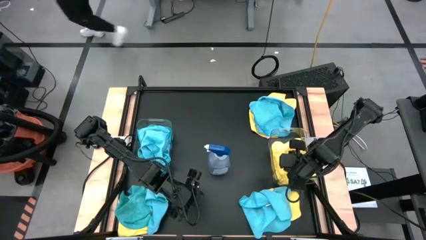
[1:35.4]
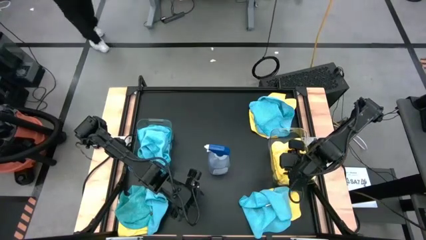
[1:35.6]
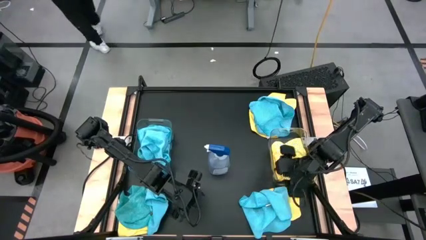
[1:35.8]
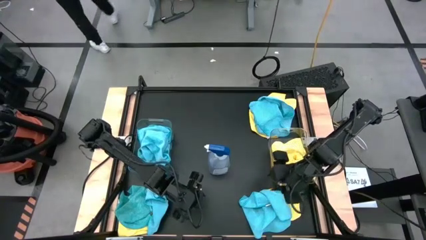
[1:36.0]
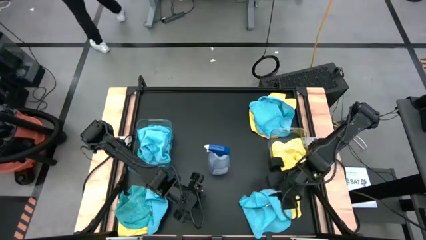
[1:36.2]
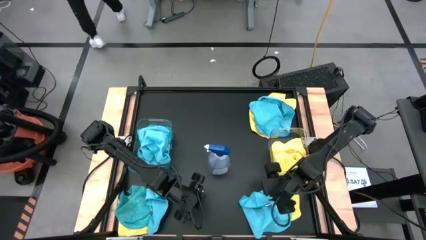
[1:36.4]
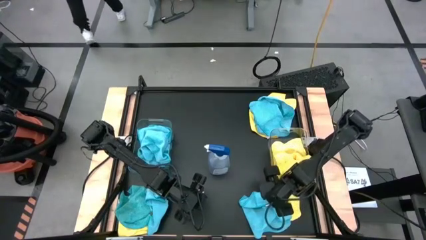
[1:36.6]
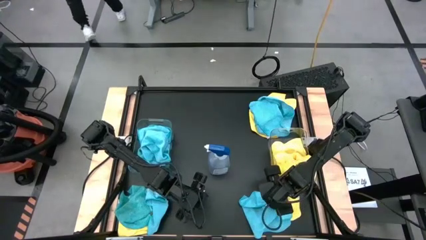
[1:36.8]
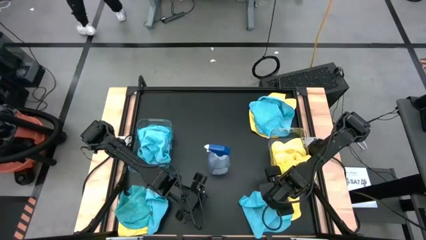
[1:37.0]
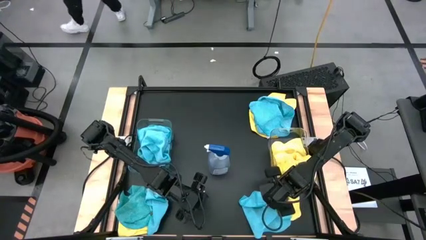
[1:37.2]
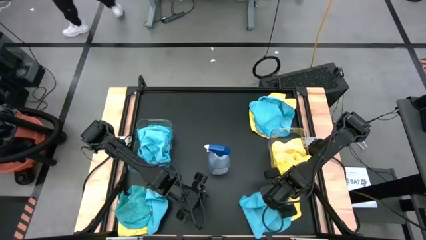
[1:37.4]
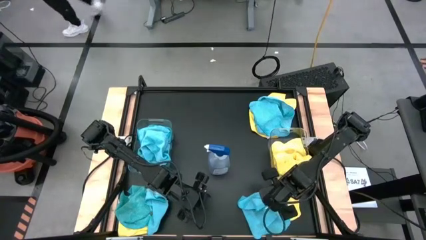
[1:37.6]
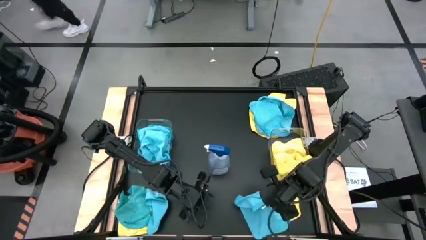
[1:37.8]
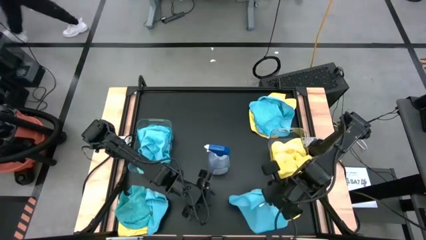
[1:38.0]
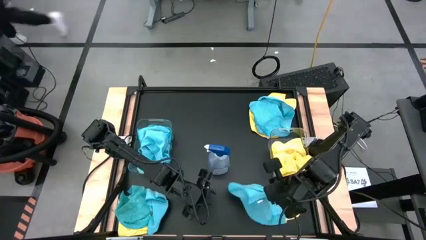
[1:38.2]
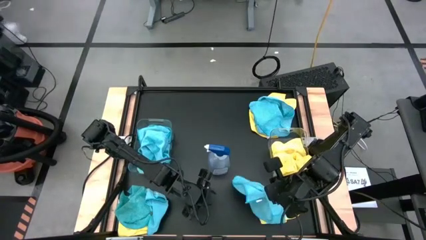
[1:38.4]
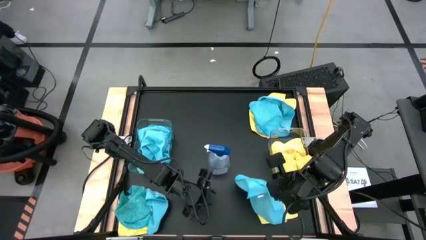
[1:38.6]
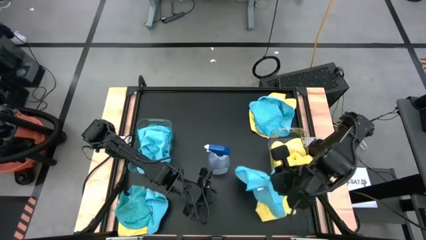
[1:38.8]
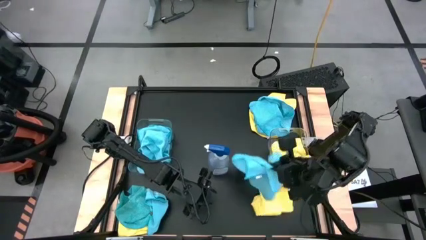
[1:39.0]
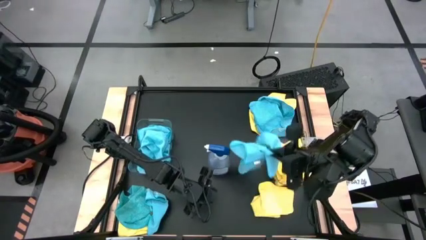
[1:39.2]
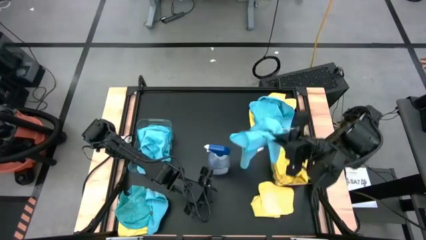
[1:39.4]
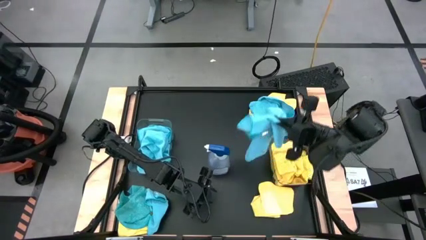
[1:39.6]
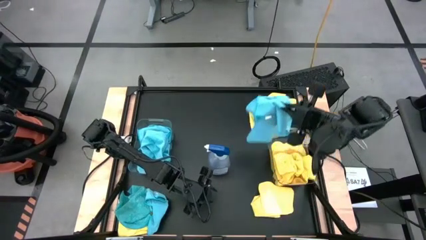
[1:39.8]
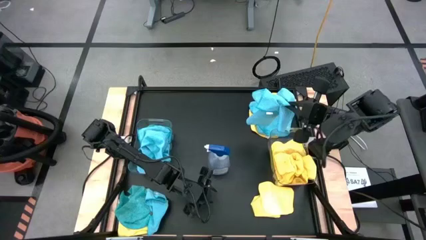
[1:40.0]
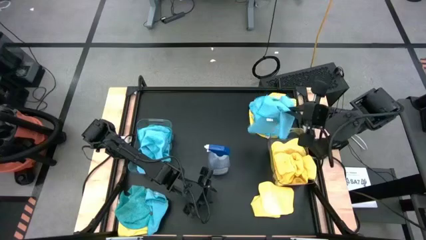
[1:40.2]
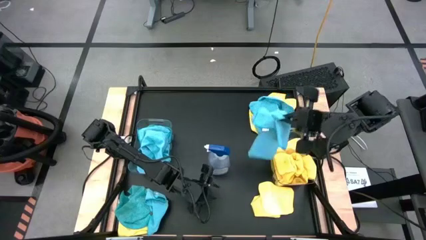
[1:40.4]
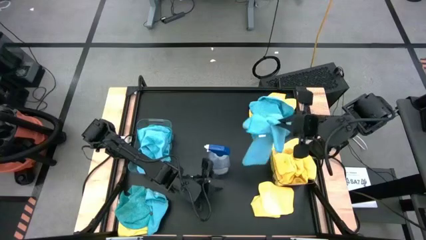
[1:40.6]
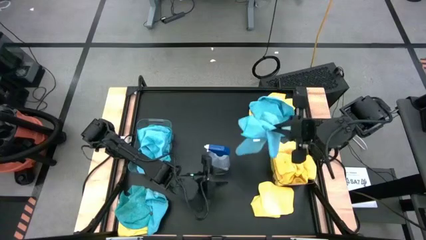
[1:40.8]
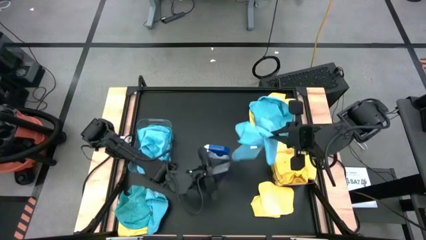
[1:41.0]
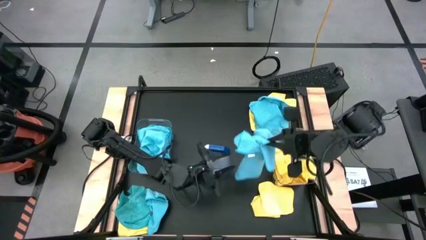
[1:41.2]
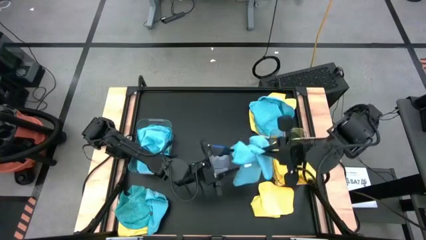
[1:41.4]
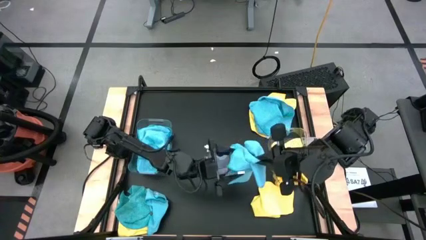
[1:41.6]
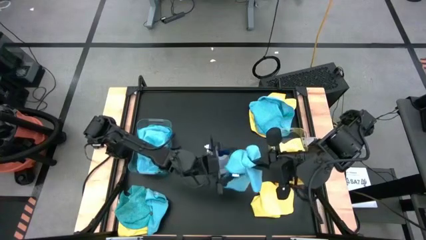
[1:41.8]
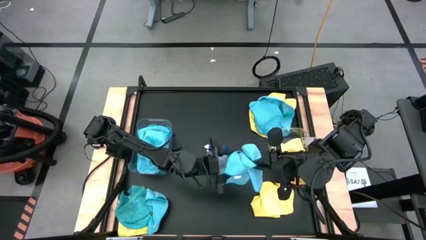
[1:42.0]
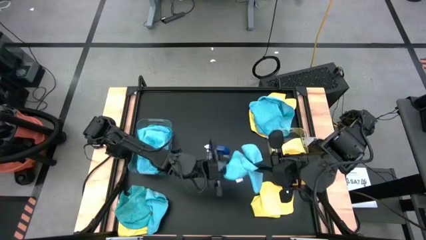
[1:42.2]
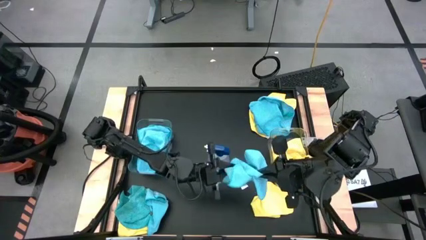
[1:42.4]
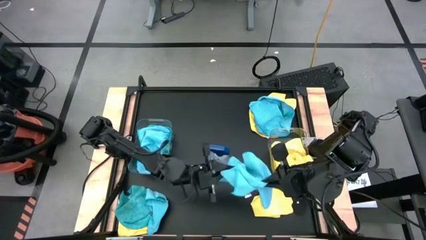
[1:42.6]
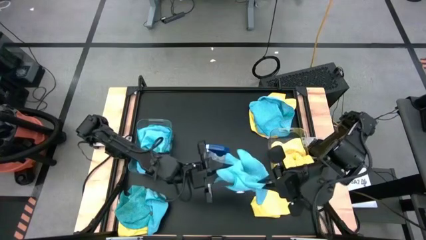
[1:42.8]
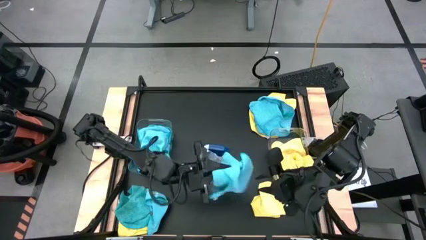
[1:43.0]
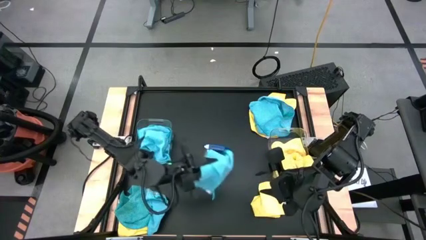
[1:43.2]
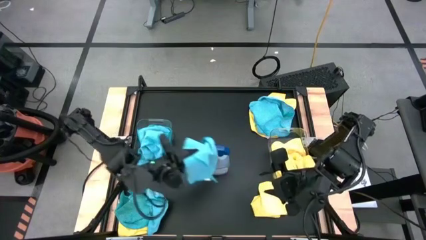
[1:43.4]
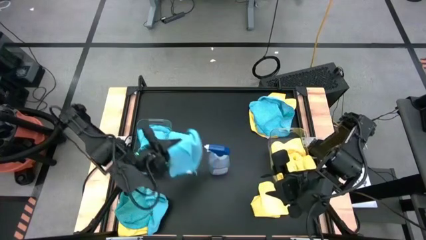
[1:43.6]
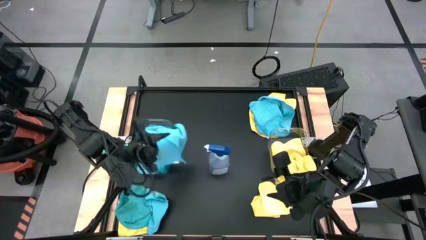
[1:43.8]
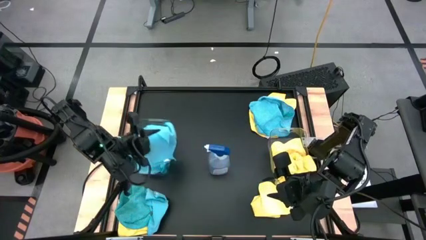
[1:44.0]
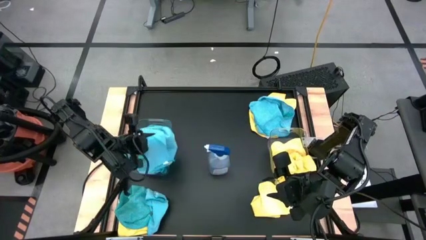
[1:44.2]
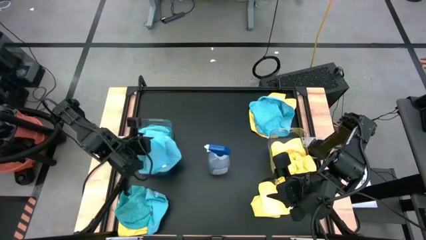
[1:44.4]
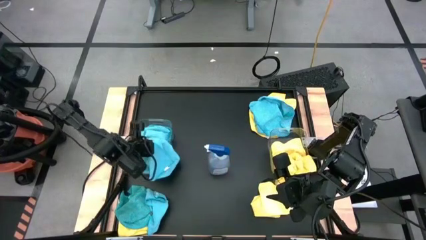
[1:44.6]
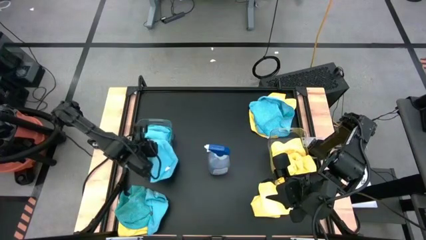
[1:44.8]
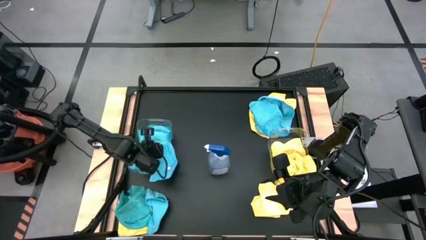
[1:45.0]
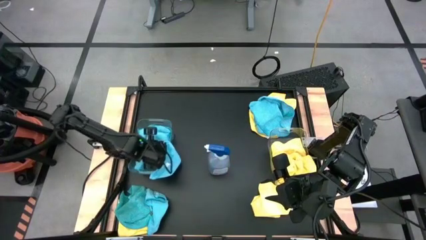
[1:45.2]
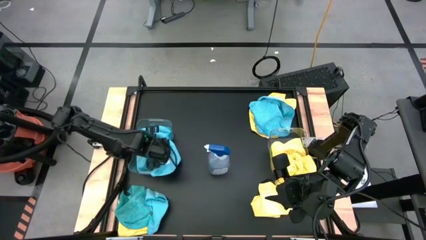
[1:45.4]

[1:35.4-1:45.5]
Task: Sort microfiber towel by color & place in baskets
Put the blue microfiber cloth into the left transparent bin

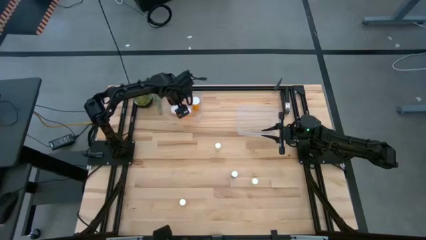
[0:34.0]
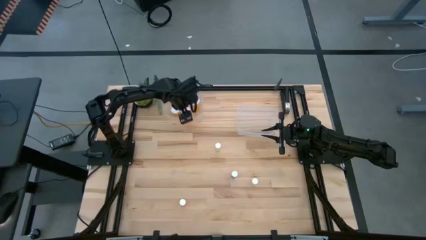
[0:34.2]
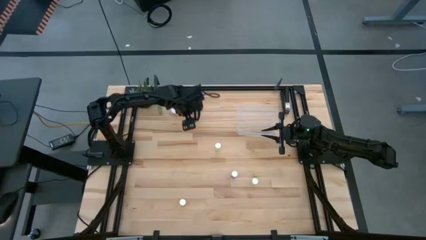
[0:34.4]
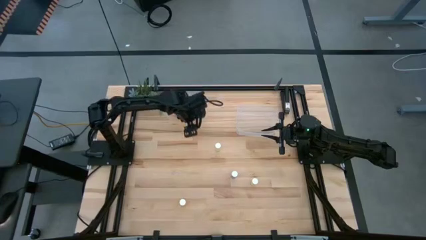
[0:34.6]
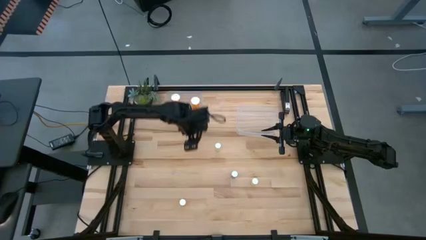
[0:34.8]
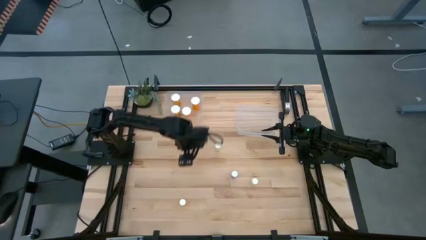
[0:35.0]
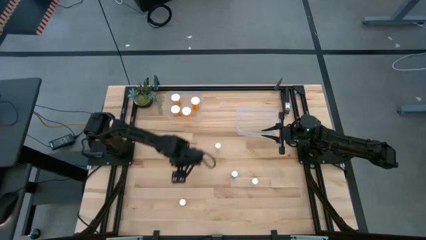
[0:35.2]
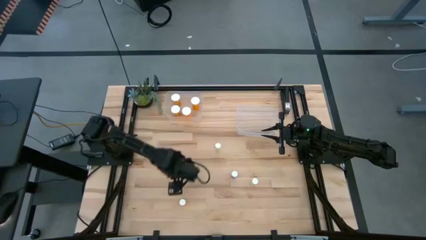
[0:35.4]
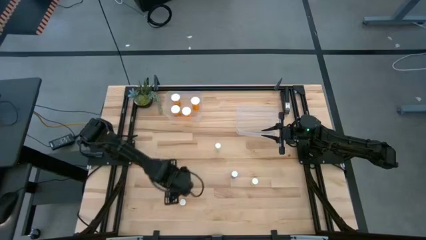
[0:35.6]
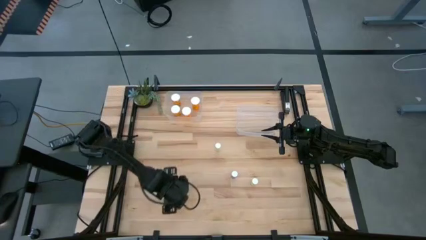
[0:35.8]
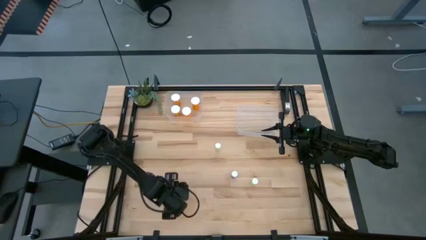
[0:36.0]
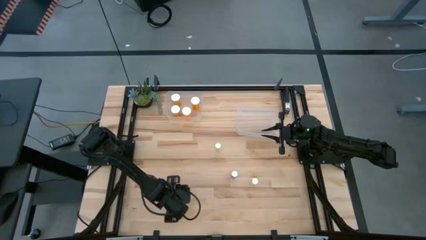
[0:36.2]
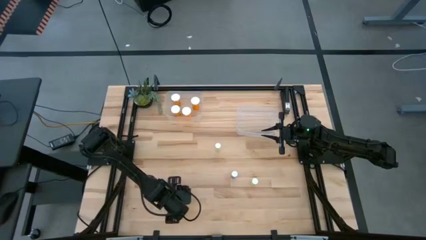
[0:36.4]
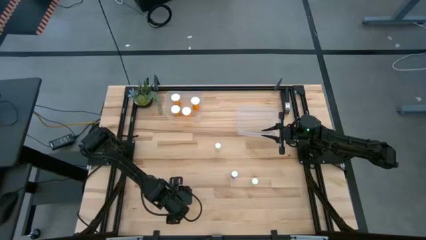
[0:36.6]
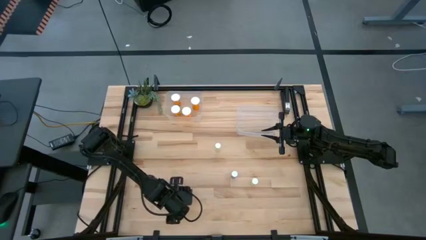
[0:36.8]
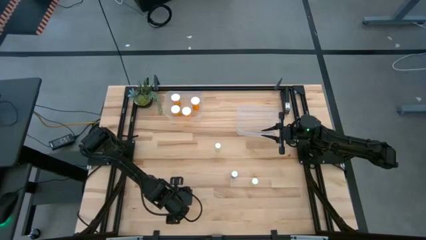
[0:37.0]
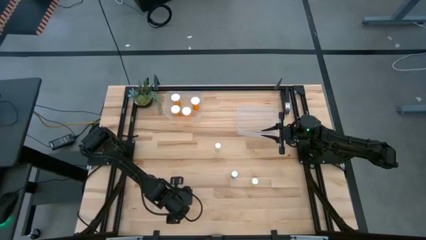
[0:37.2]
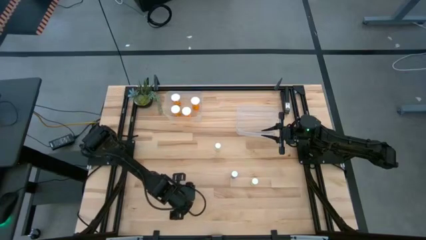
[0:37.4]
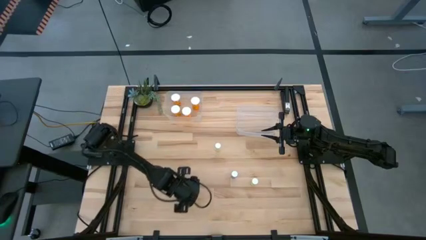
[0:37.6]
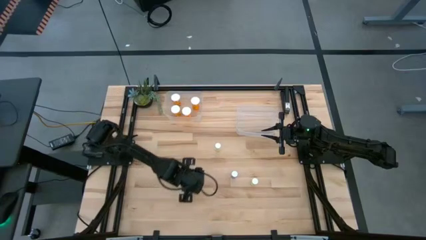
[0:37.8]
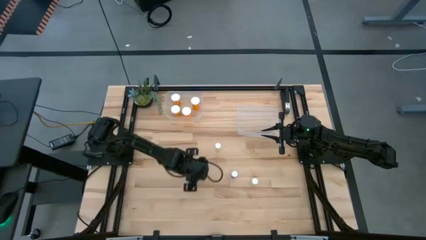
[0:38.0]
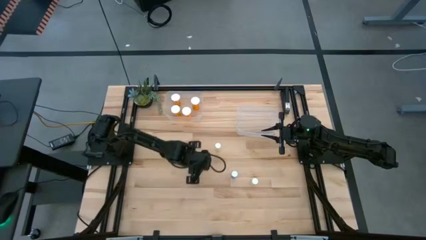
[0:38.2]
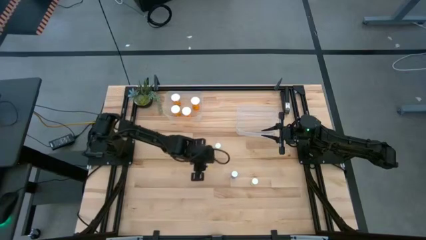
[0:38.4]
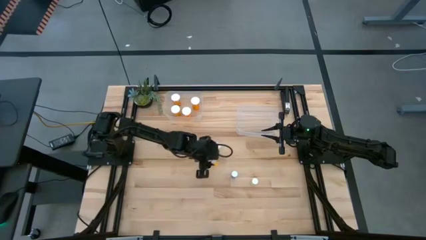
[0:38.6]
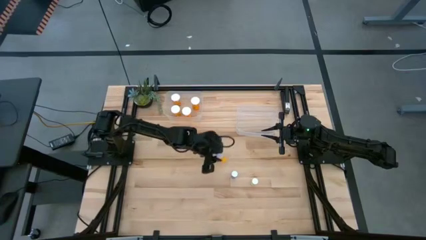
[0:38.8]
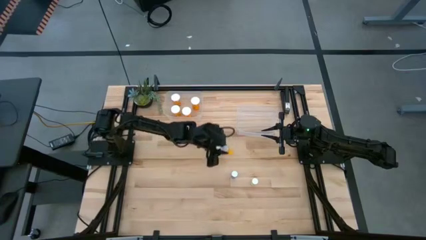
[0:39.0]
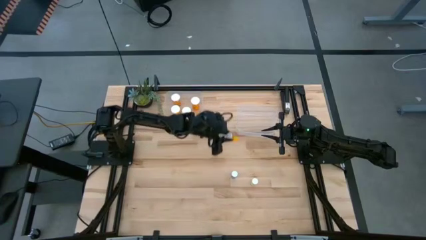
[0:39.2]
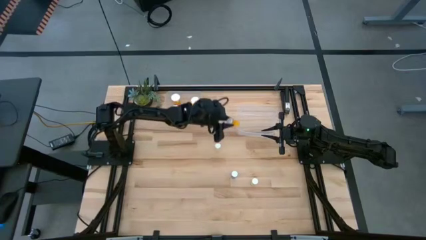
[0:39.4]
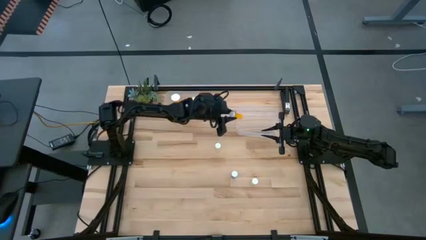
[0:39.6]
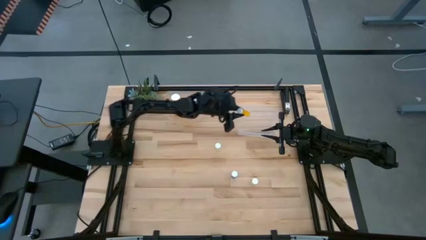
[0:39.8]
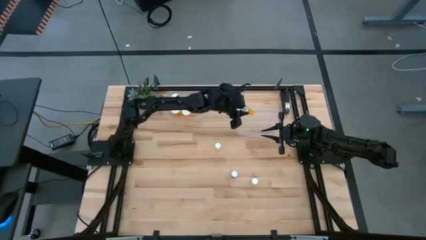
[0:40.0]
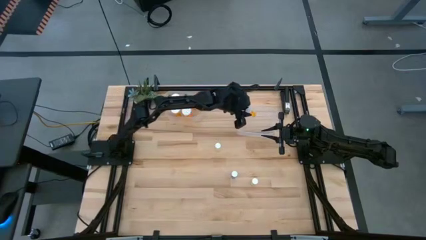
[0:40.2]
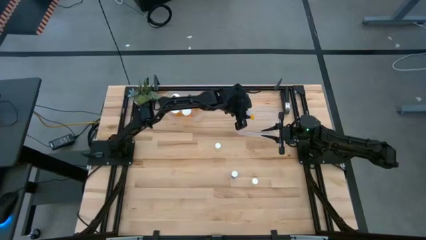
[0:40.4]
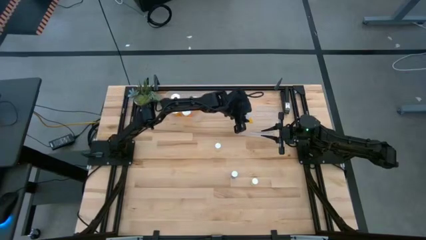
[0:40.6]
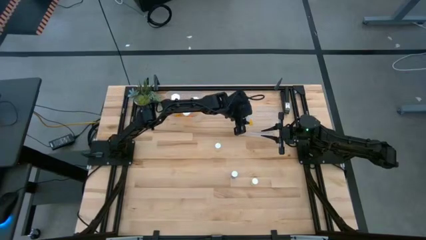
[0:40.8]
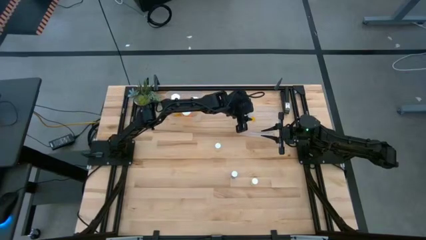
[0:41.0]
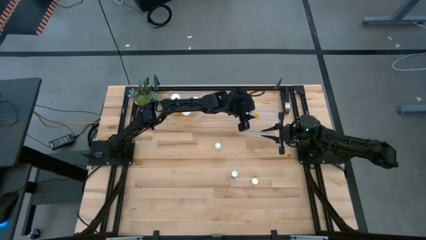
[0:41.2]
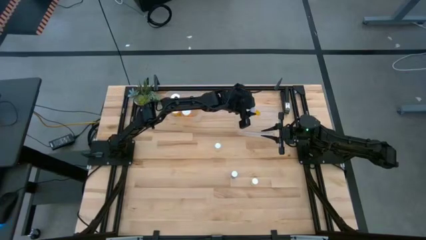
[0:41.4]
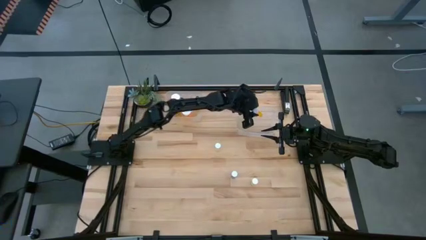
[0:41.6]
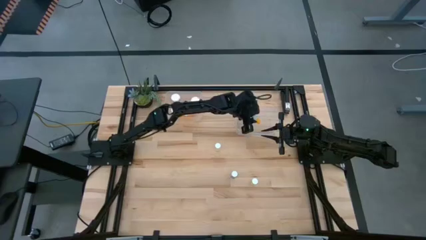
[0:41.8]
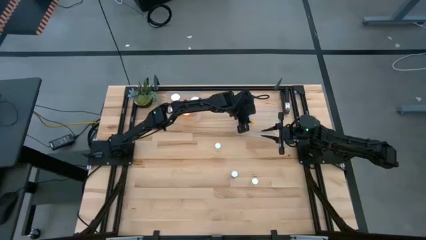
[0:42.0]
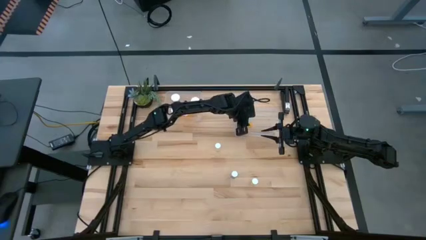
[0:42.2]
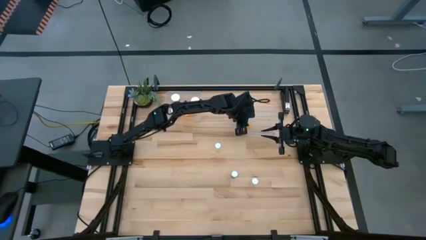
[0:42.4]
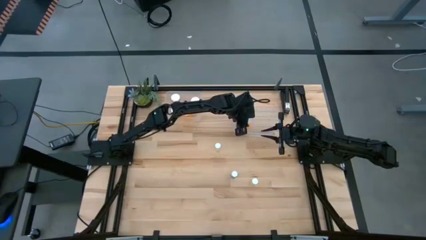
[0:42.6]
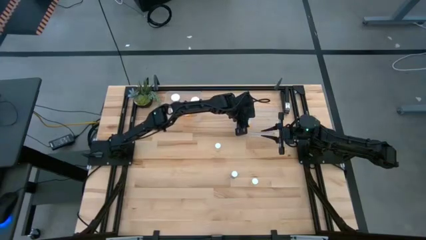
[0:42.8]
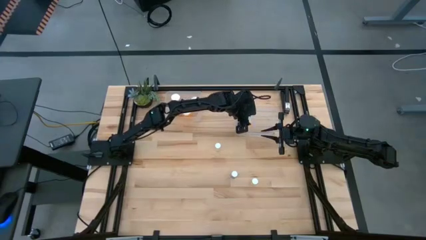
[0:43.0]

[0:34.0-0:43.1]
Task: Pick and place medicine bottles into bin by pill shape (circle, oval)
Put the small orange pill bottle into the right transparent bin
